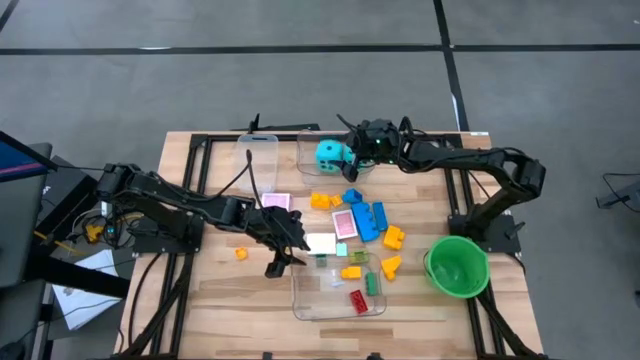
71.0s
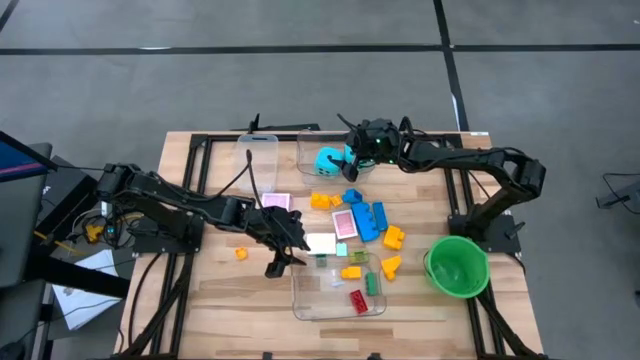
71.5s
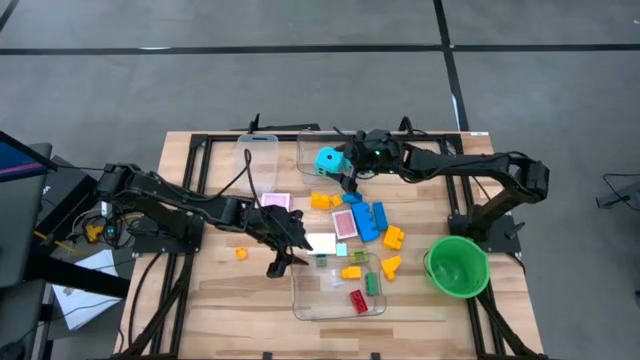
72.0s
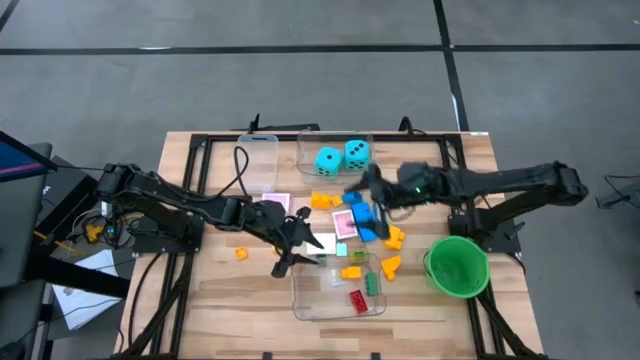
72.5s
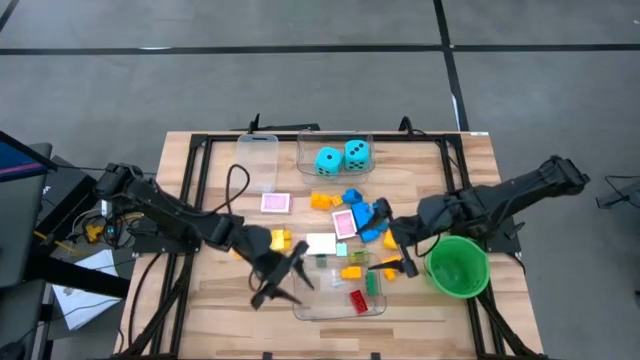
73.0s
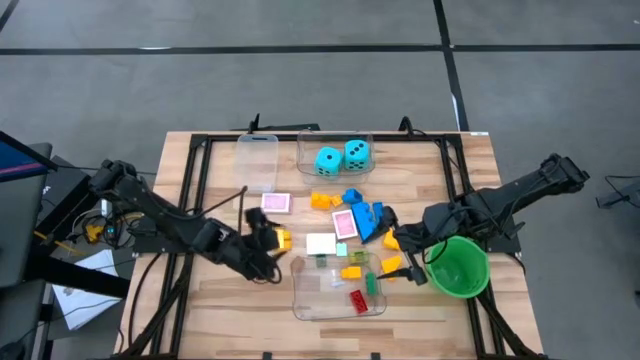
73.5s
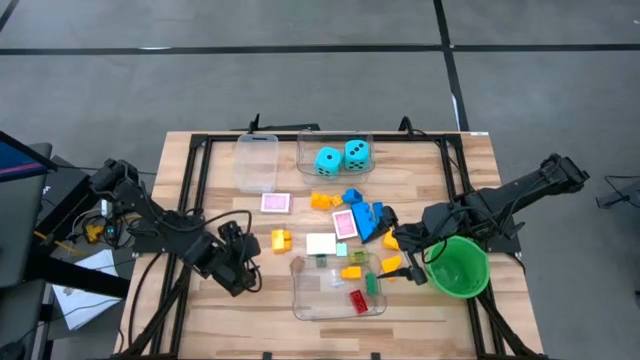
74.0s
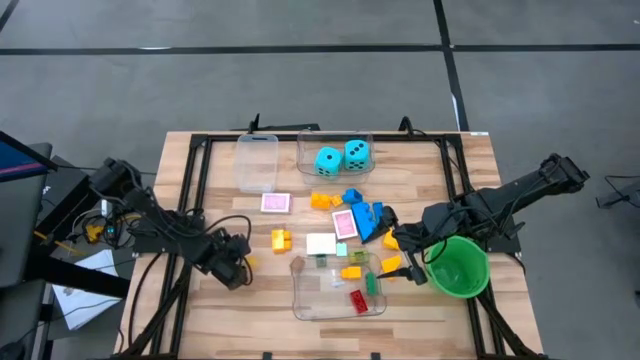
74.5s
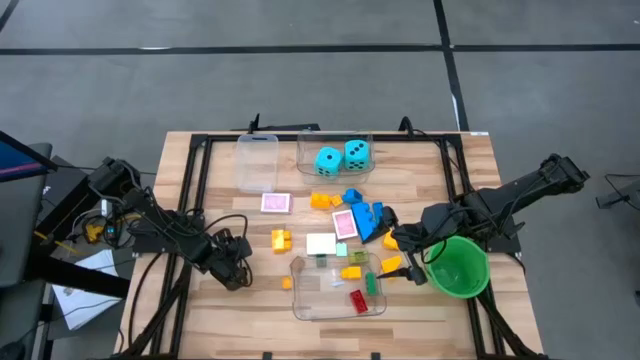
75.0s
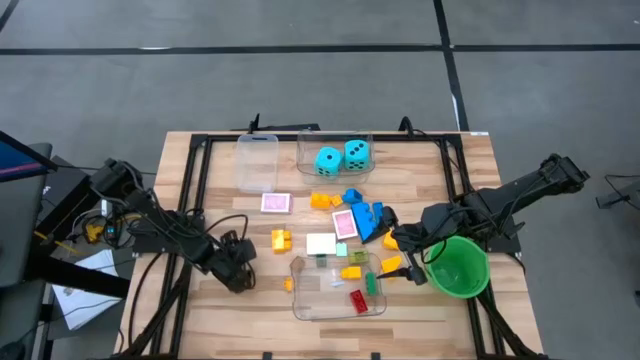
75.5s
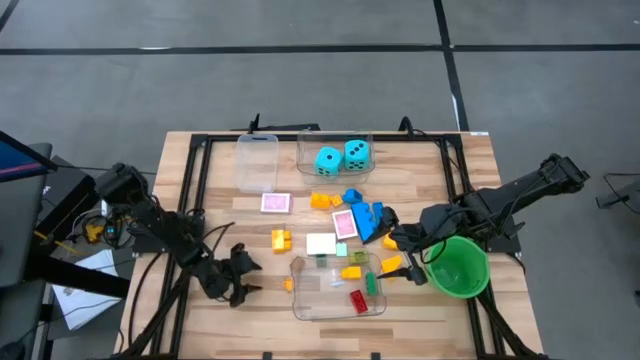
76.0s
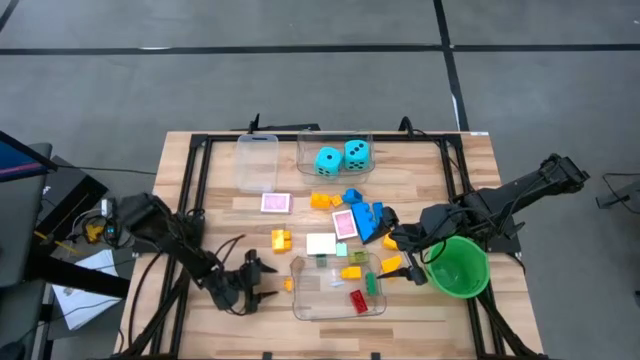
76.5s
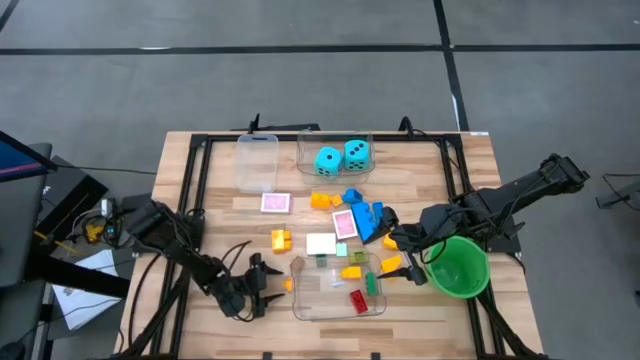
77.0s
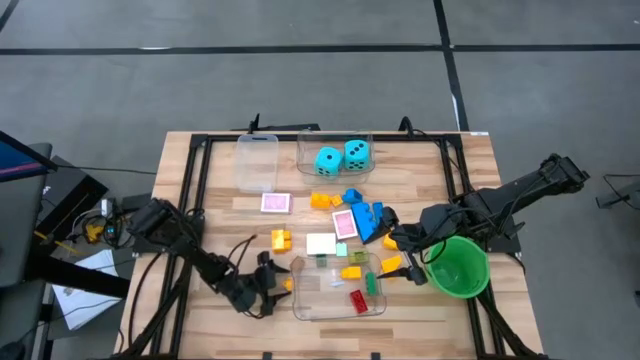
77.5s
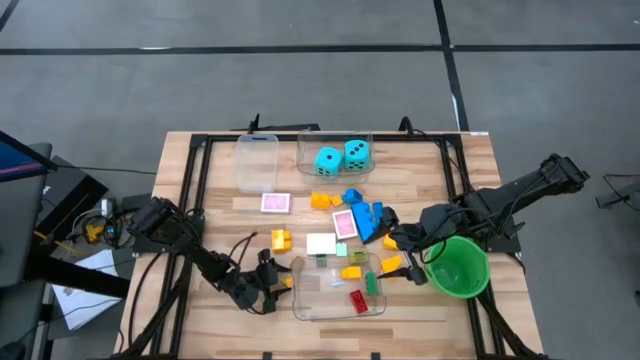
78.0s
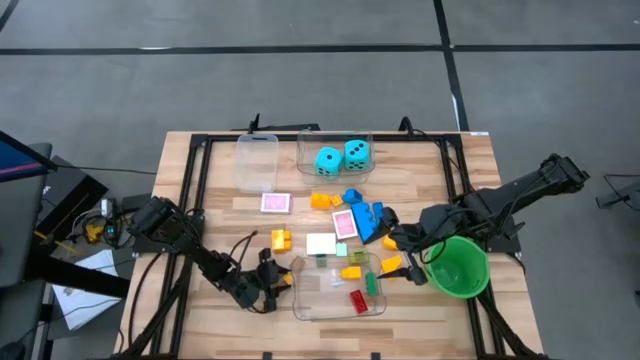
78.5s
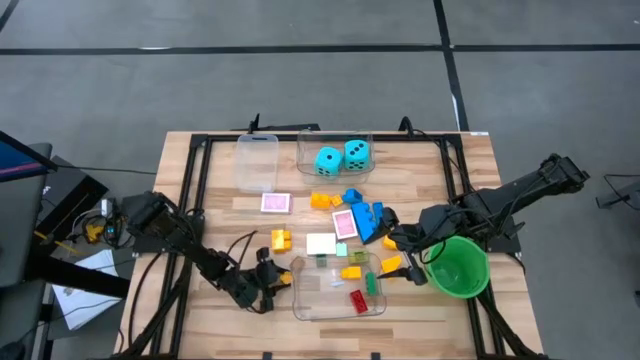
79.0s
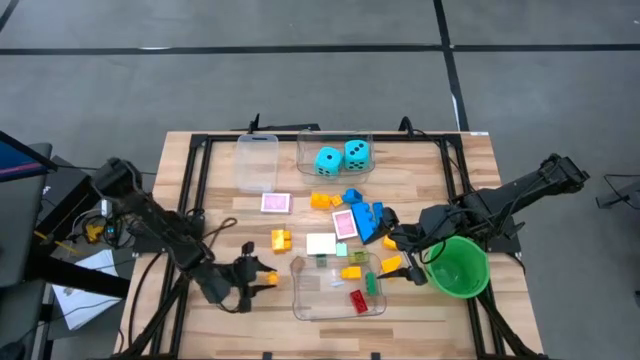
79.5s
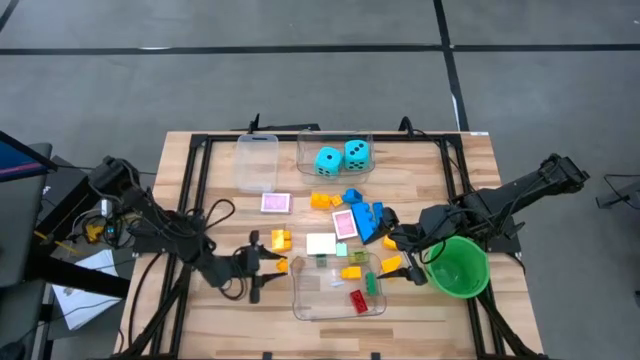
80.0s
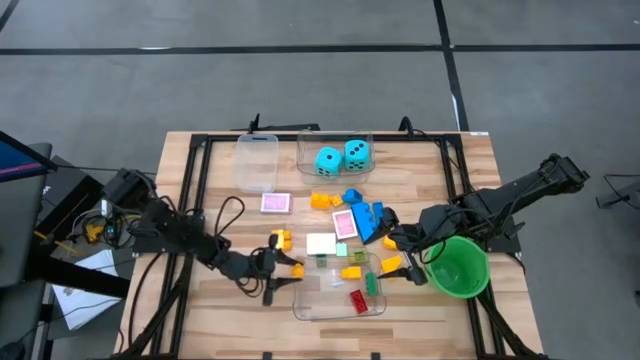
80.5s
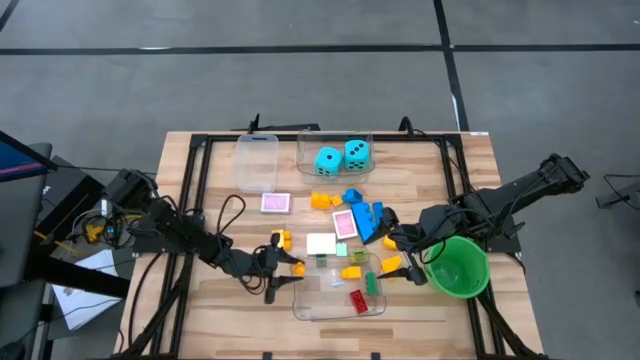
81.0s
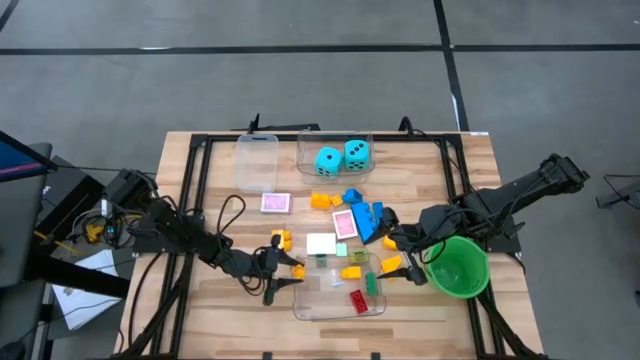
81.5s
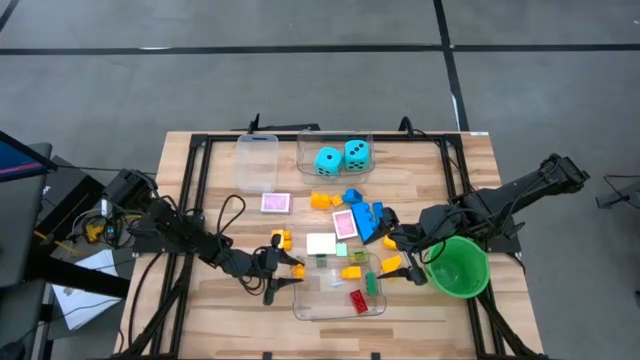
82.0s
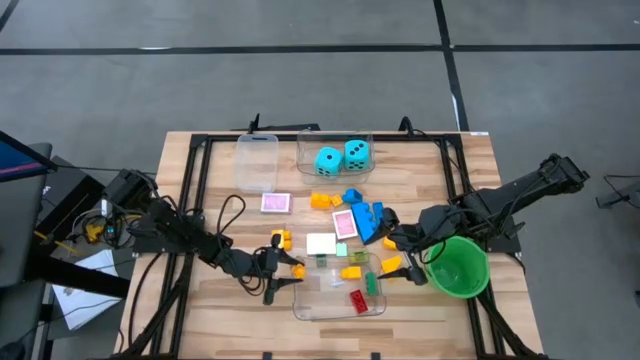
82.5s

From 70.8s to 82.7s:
Task: Pick & Place Toys
Put the yellow game piece into the bottom transparent bin

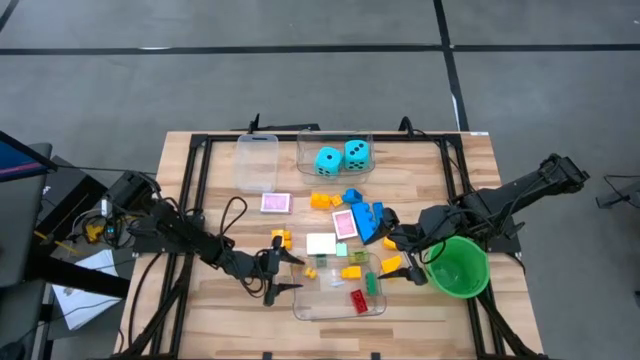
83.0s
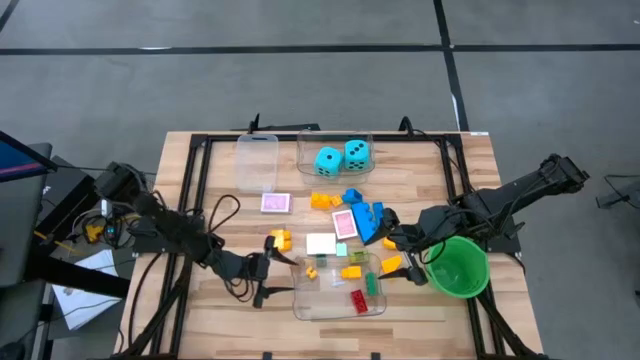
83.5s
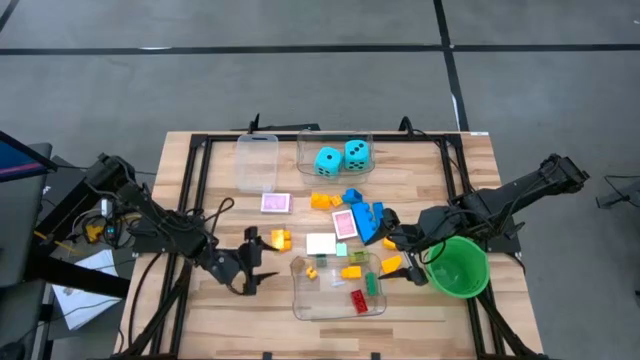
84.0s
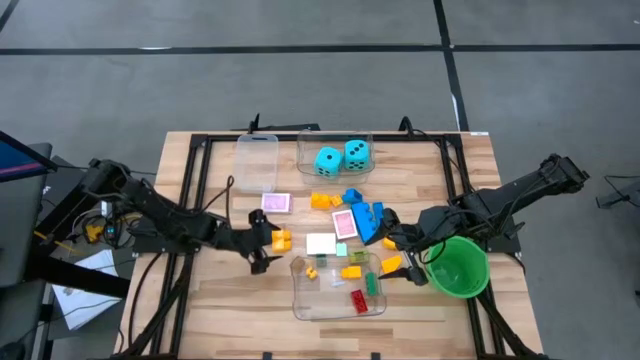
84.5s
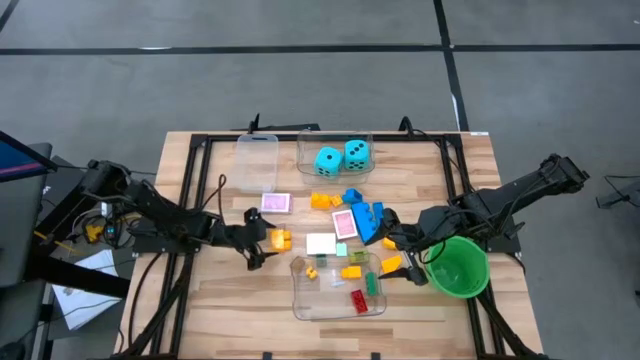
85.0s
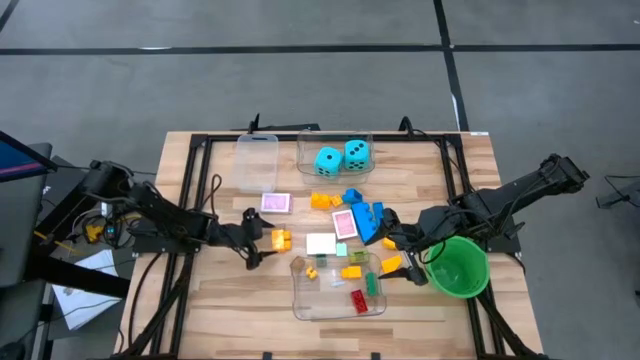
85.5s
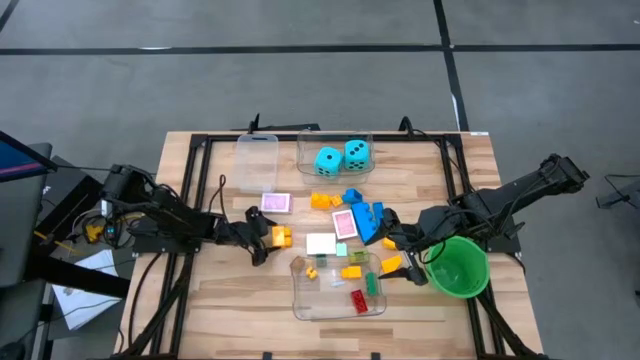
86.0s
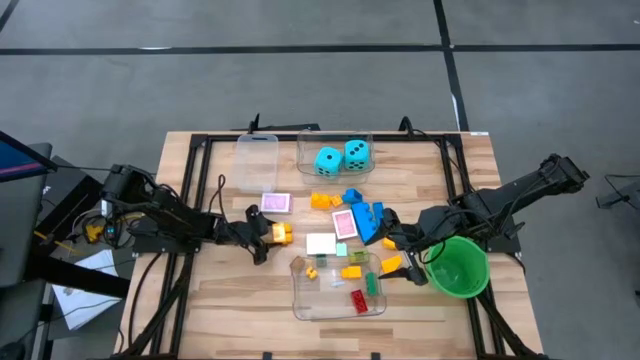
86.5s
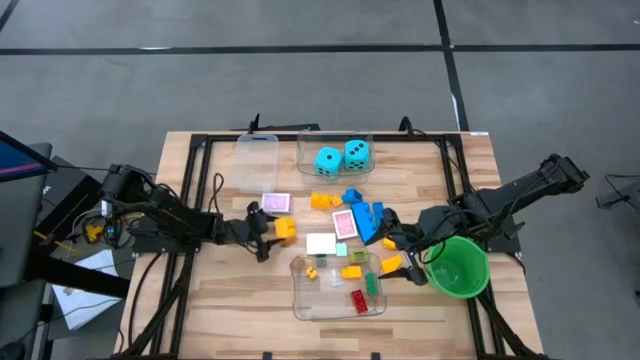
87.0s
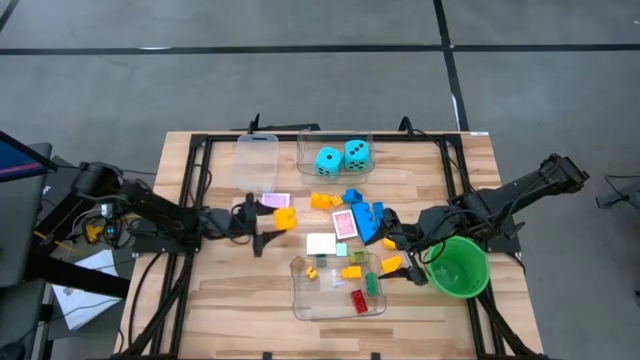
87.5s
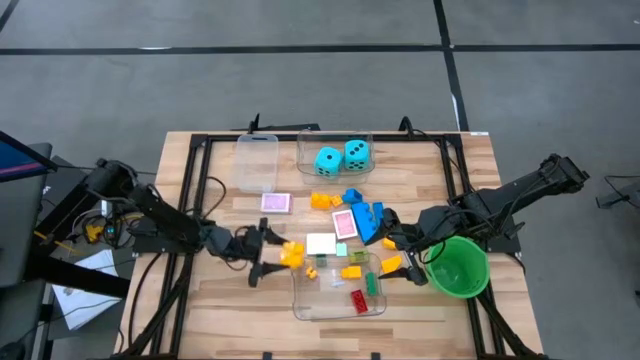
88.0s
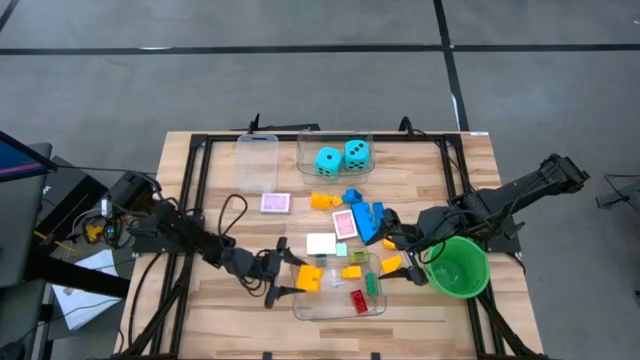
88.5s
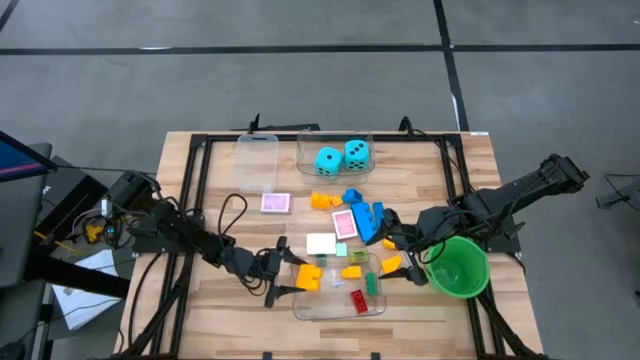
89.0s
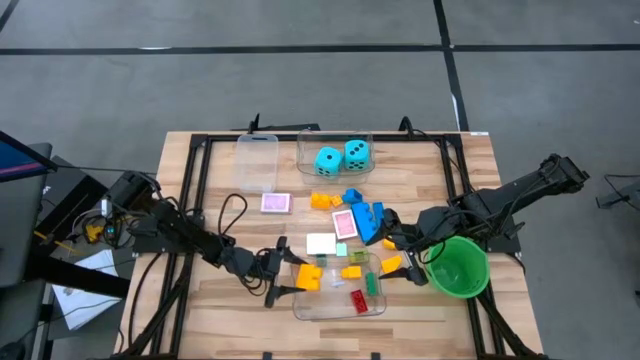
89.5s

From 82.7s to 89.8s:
Put the yellow game piece into the bottom transparent bin

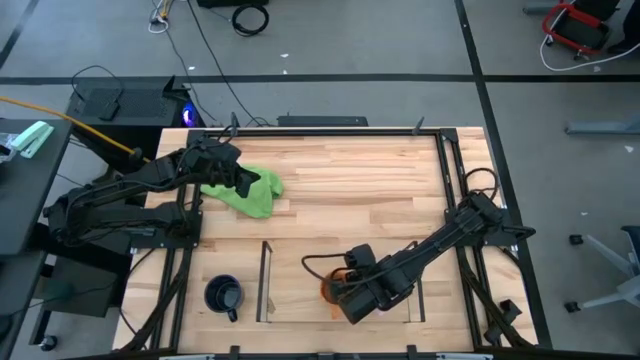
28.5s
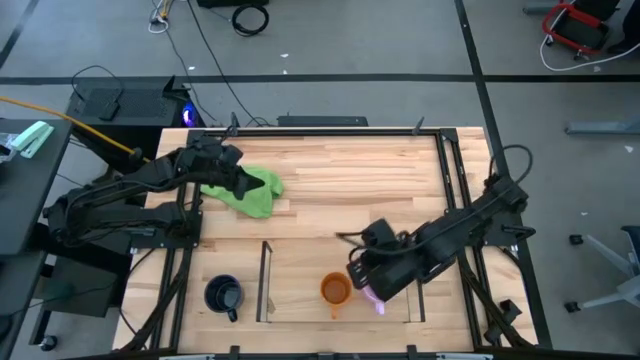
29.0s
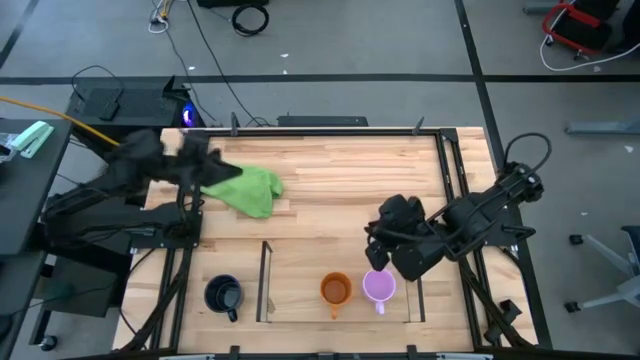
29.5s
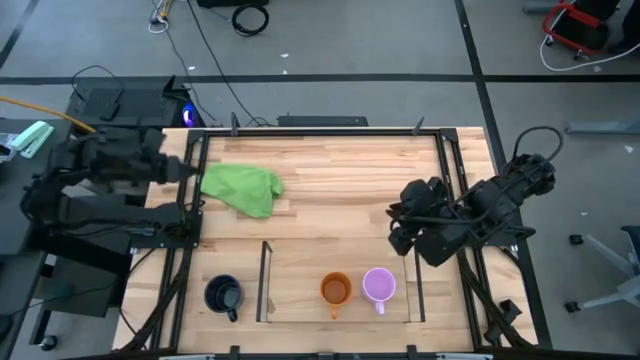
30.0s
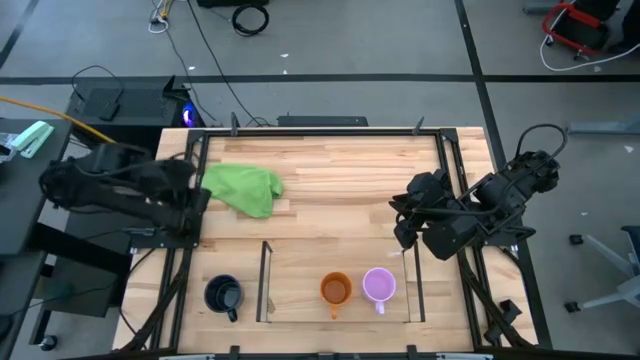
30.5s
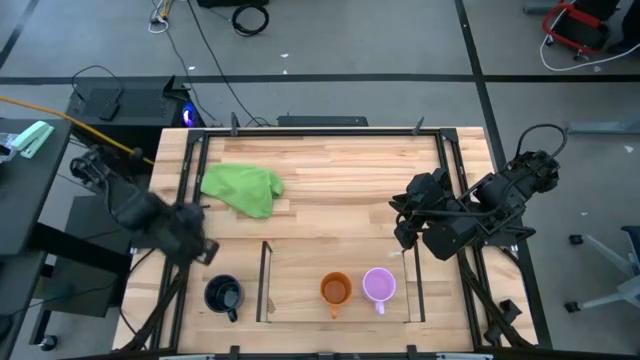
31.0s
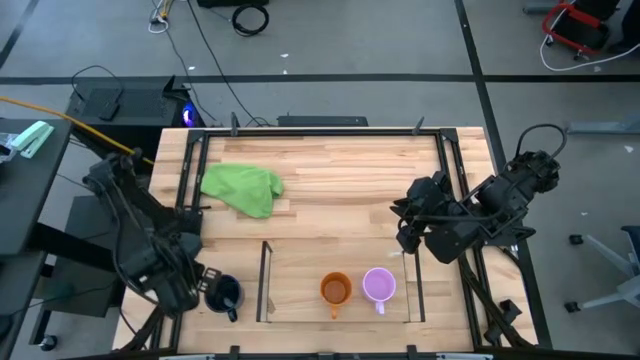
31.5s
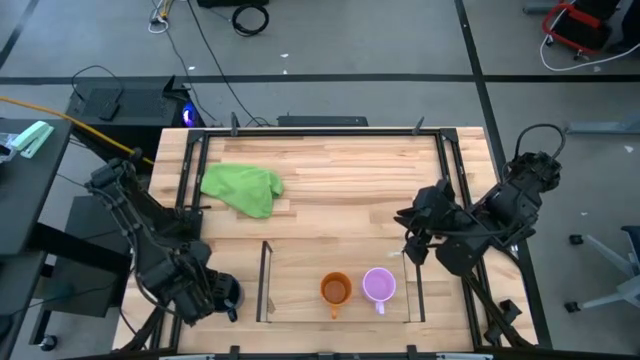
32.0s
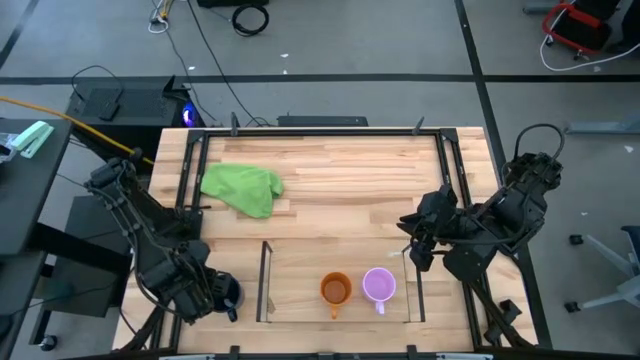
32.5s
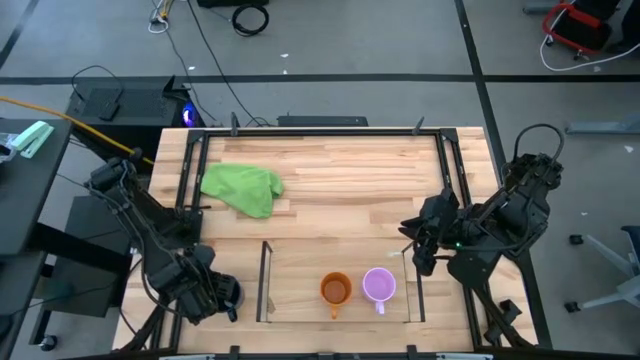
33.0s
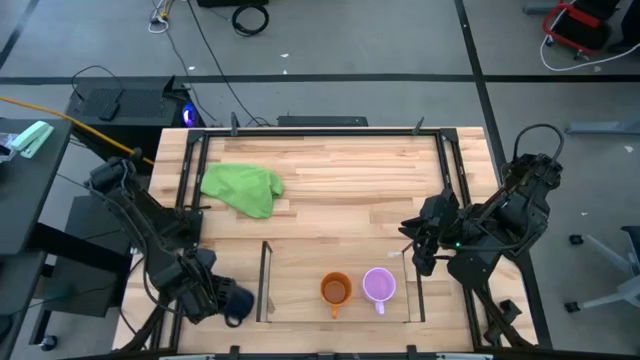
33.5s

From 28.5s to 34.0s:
Task: Stack small to large cups/mugs on shelf
Put the black cup on the shelf
